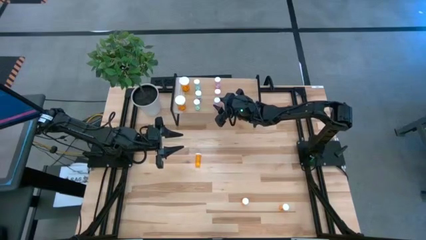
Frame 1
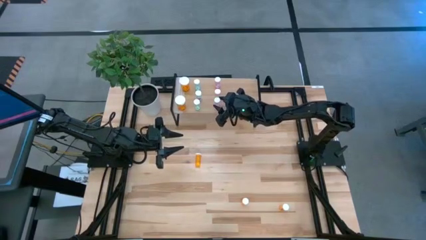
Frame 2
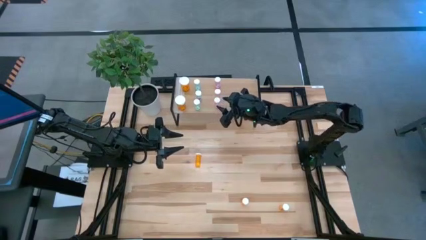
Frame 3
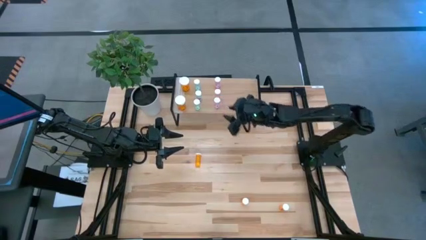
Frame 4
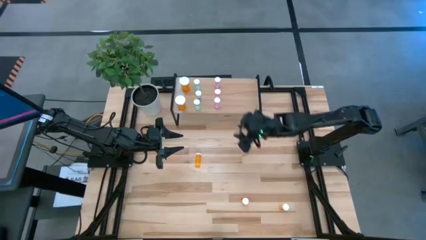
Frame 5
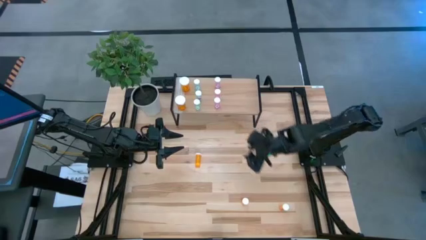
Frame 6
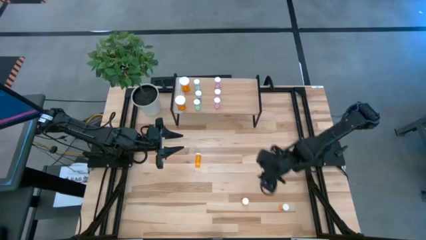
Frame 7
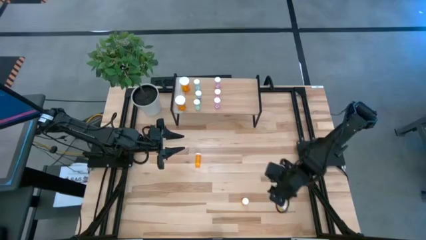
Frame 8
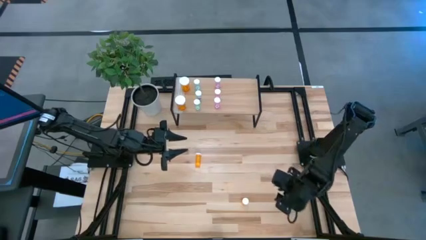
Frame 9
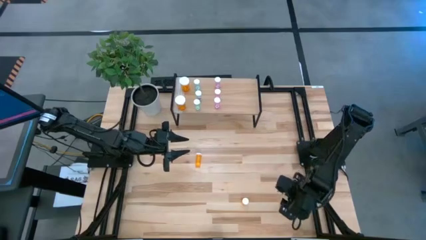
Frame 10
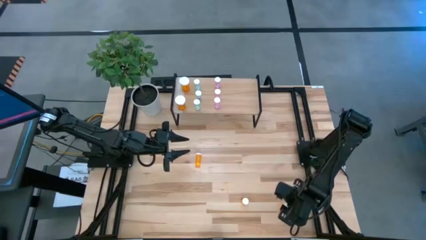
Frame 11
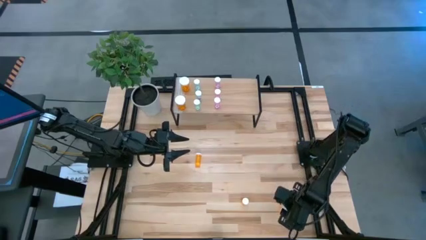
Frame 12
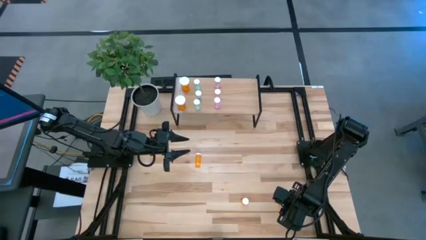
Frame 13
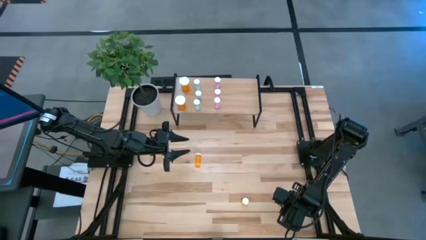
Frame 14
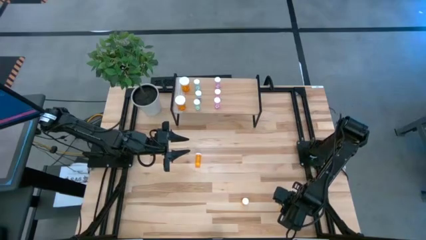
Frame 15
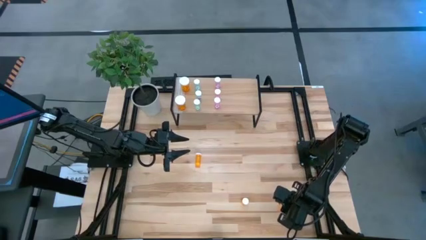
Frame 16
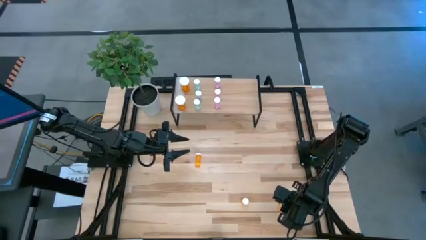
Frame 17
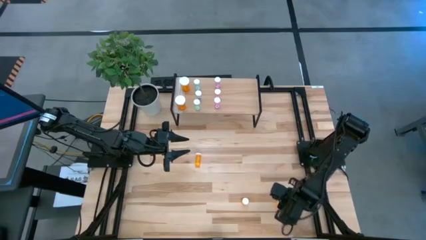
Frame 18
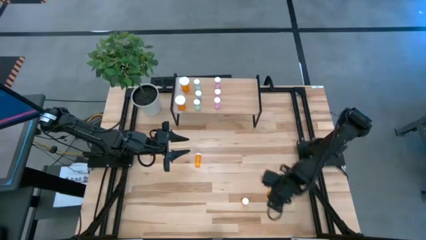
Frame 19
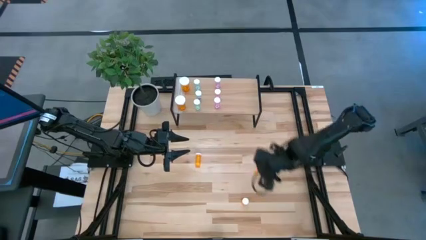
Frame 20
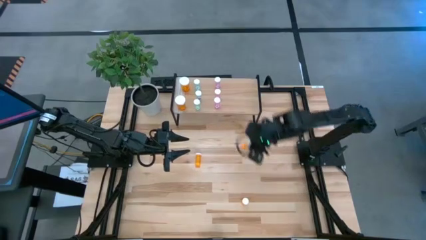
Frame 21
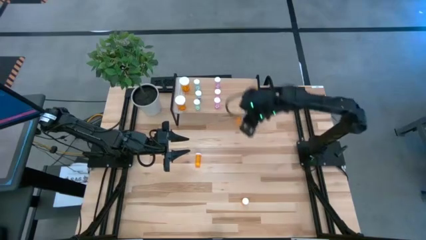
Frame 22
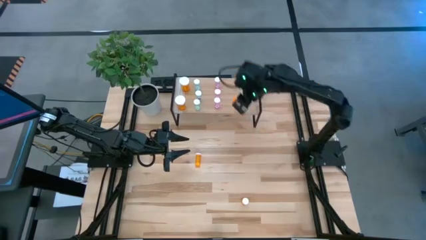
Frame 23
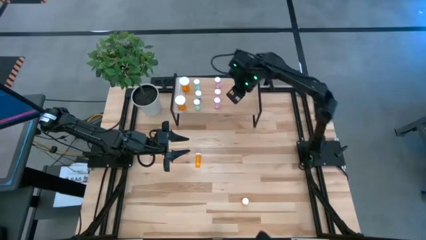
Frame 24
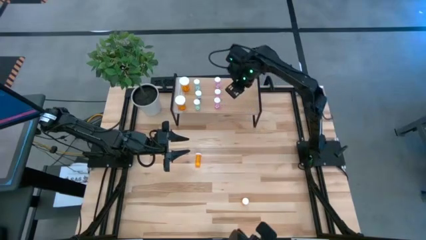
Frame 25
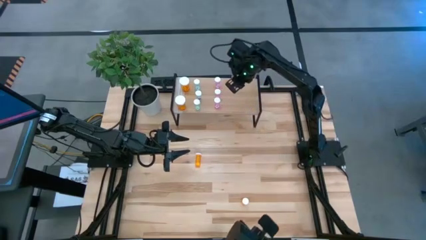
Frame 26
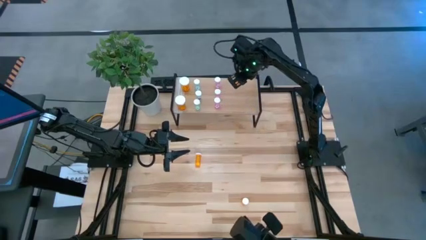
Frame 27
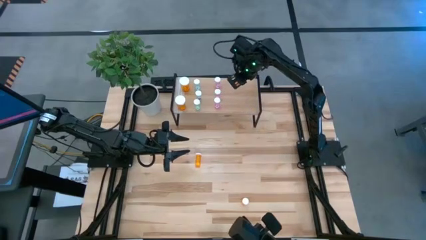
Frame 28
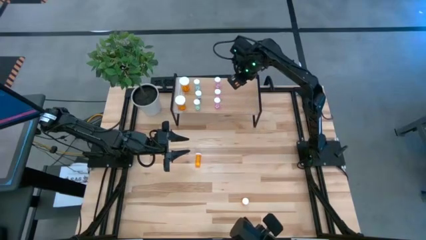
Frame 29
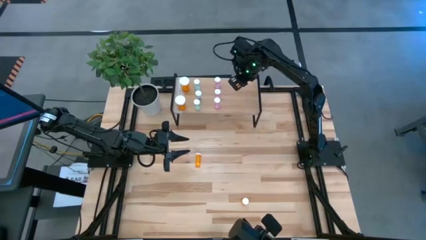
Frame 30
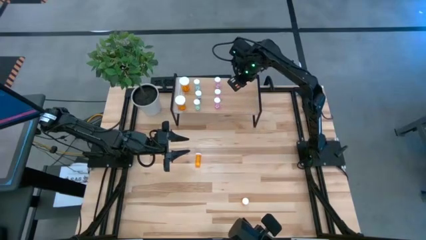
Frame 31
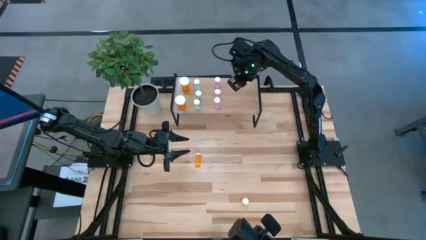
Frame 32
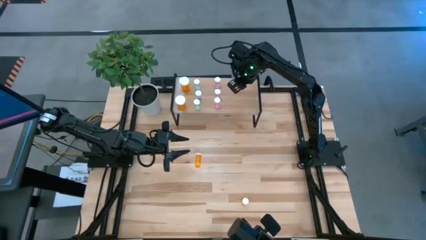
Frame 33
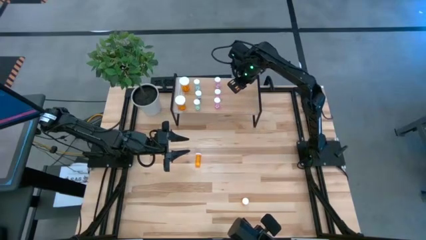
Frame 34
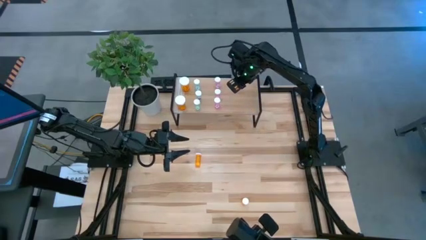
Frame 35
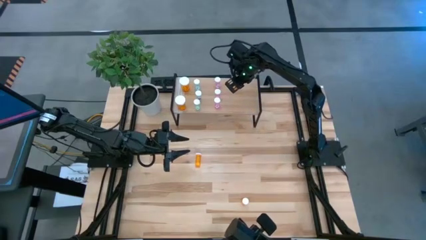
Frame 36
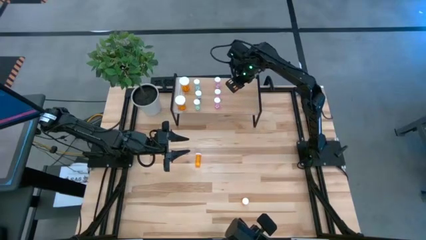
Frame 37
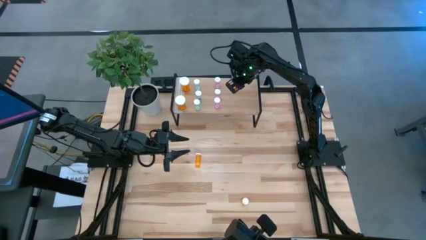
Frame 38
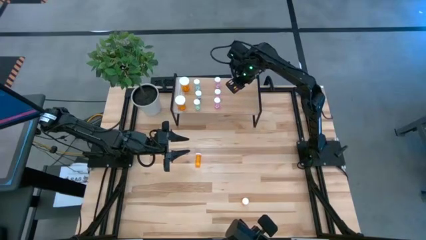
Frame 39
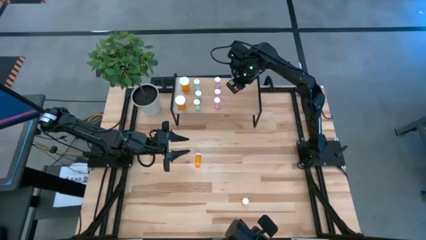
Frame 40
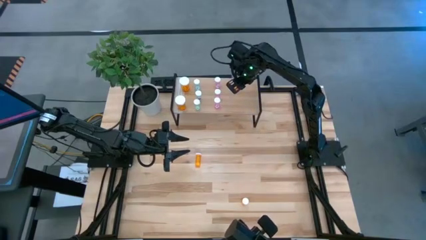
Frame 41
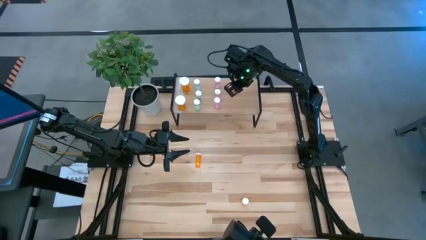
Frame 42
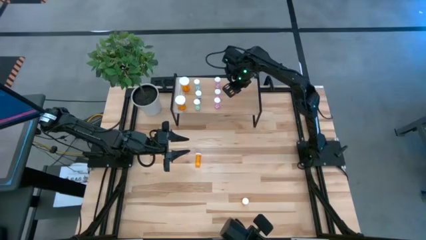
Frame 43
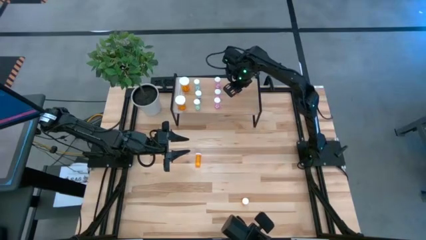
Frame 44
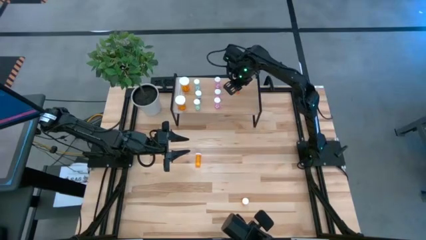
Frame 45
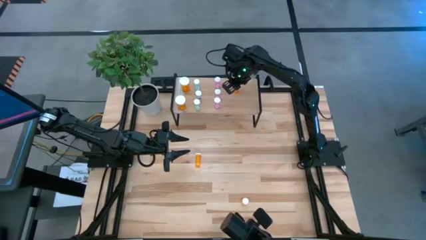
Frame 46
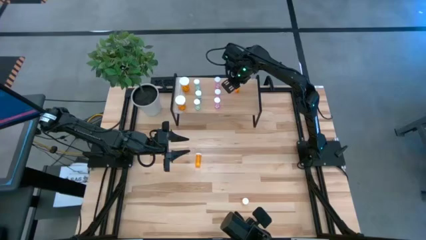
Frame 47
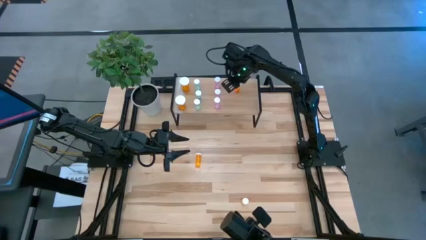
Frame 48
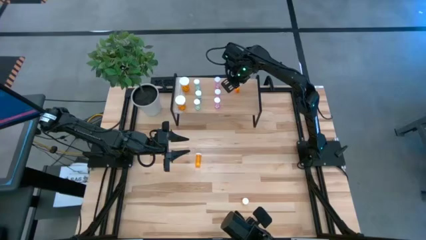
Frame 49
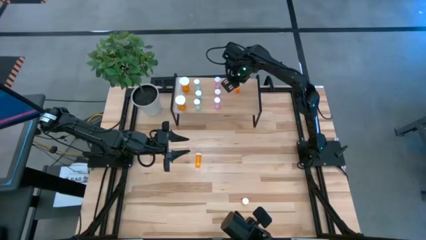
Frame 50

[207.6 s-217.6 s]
Task: Pick and place medicine bottles onto shelf by color
Put the bottom right small orange pill bottle on the shelf
